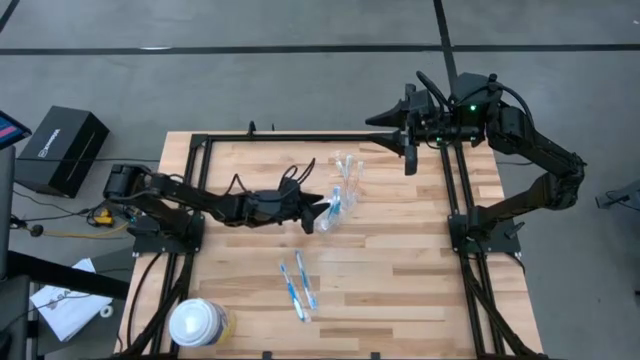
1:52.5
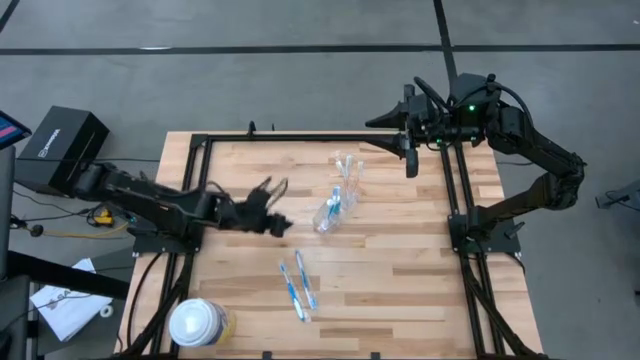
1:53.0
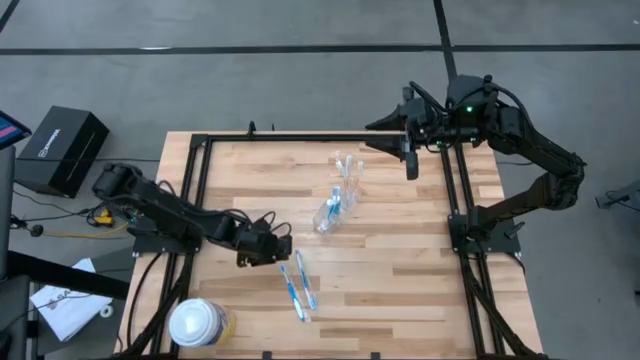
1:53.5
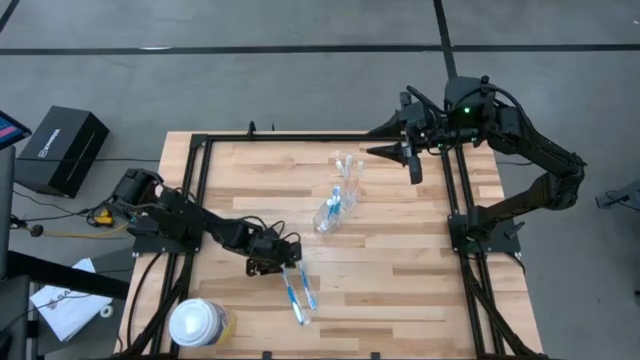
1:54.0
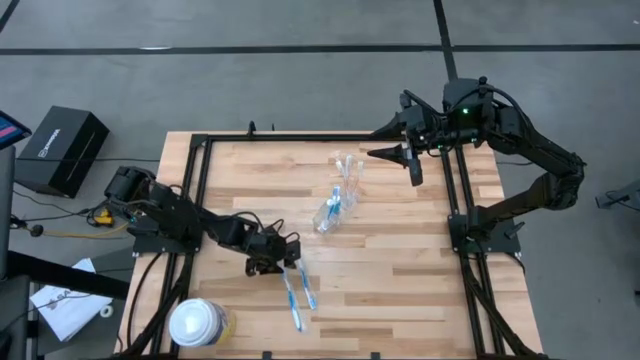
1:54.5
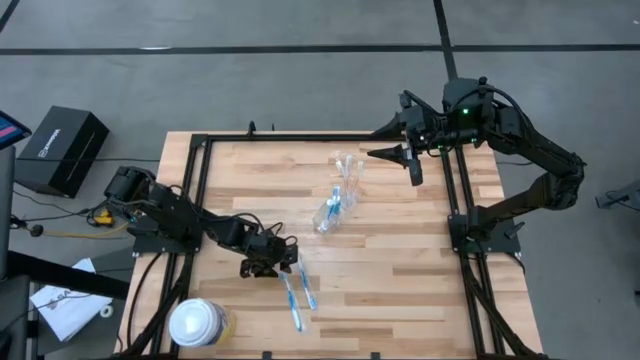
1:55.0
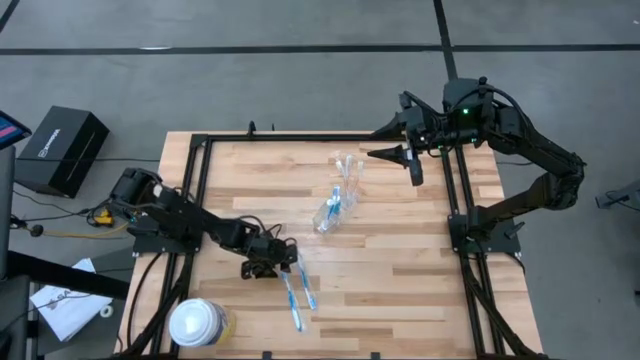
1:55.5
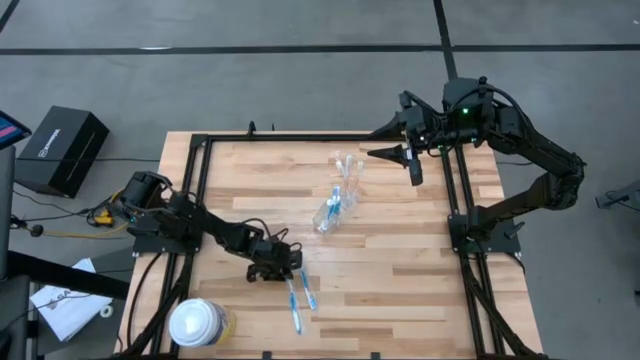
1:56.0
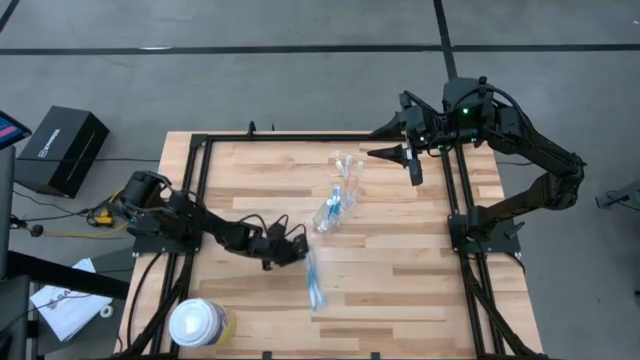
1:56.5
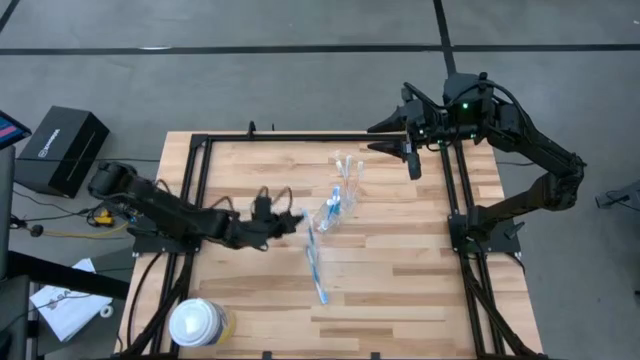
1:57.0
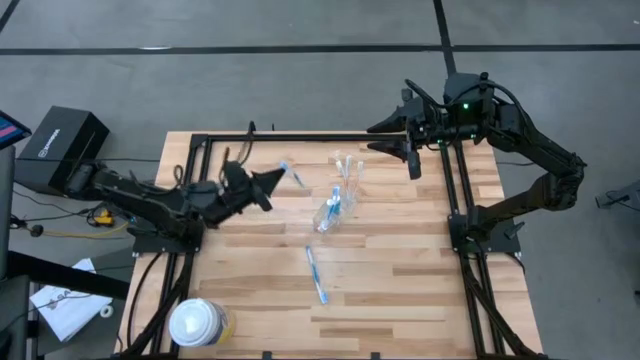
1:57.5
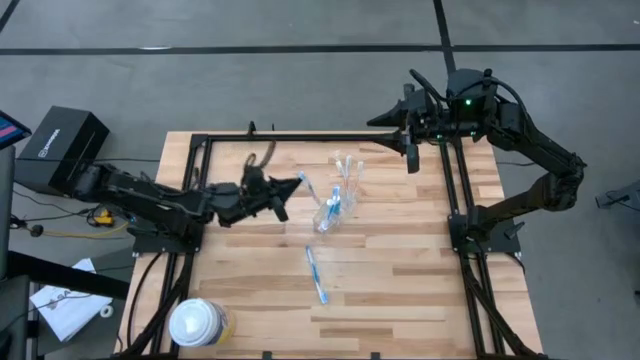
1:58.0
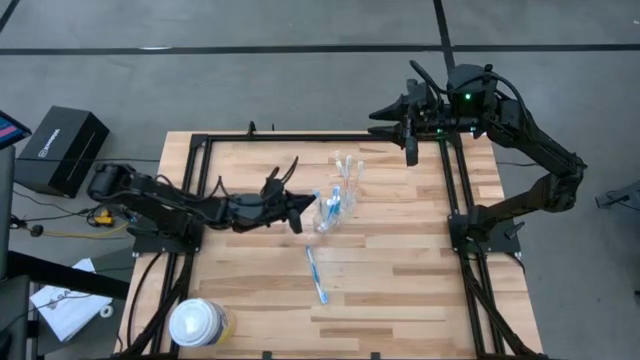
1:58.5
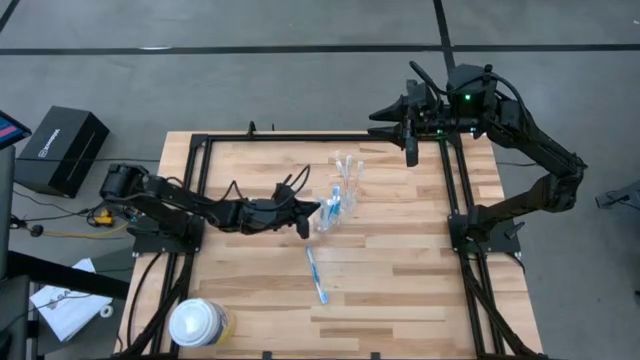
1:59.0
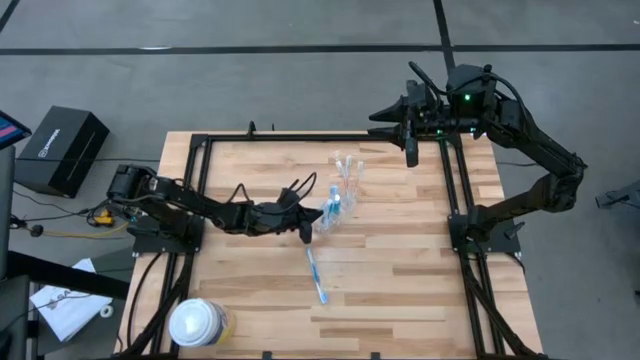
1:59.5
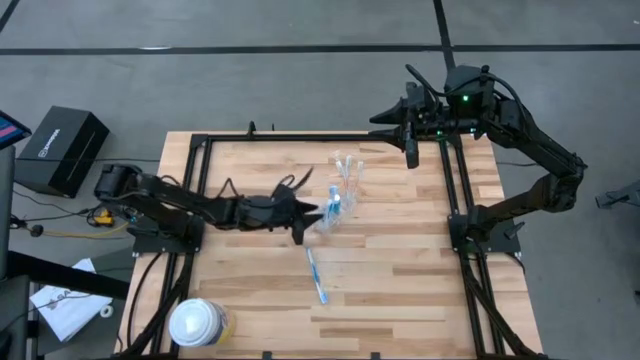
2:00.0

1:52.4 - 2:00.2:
Task: Pick & Place toothbrushing station
Put the left blue toothbrush into the left section of the transparent organizer

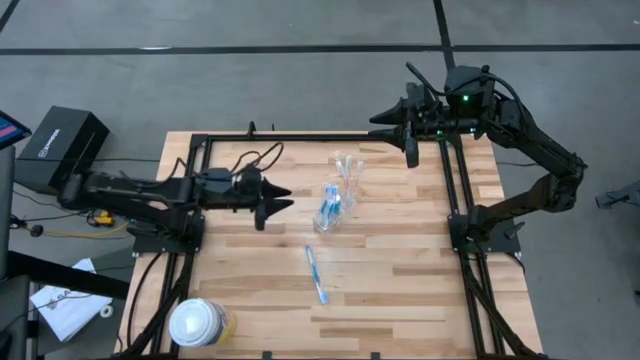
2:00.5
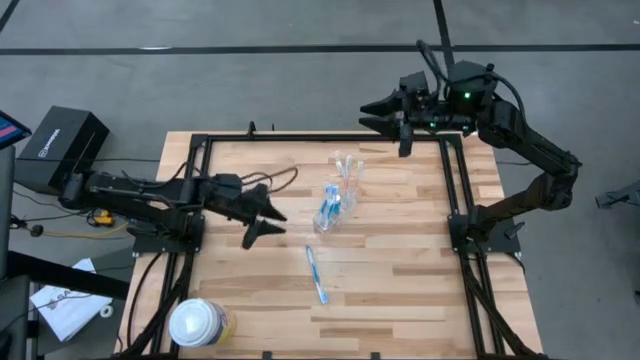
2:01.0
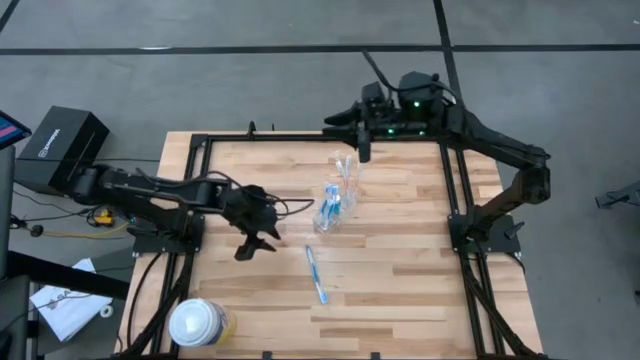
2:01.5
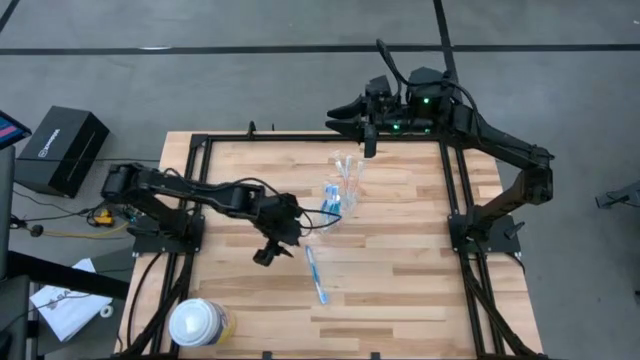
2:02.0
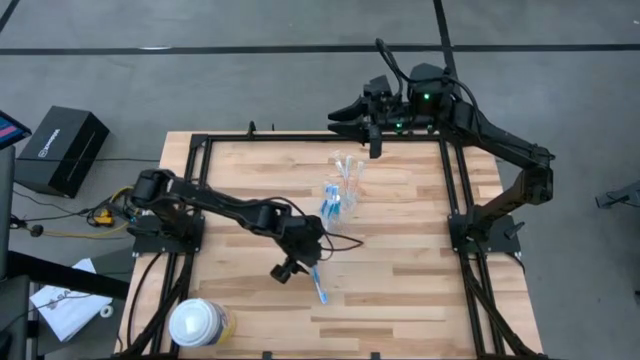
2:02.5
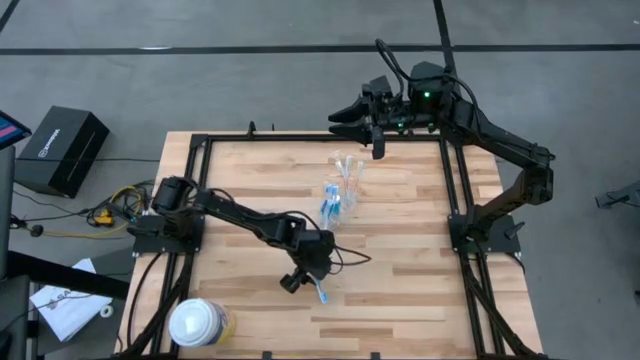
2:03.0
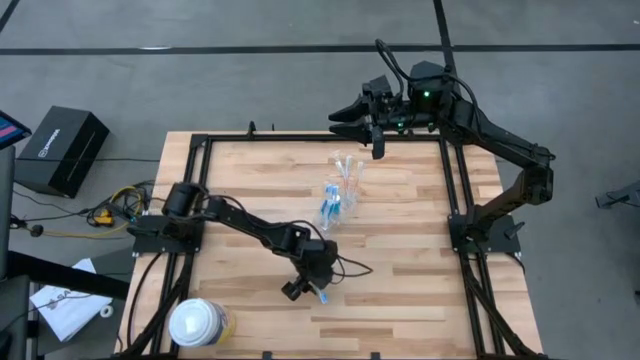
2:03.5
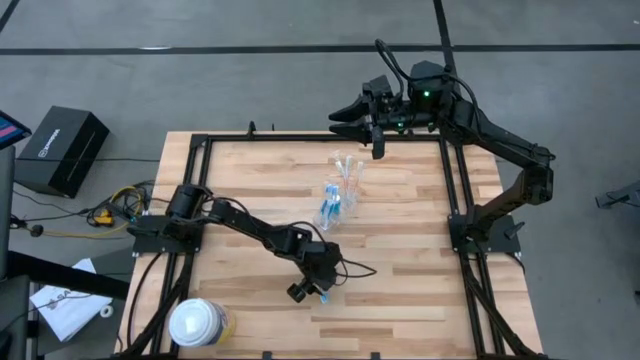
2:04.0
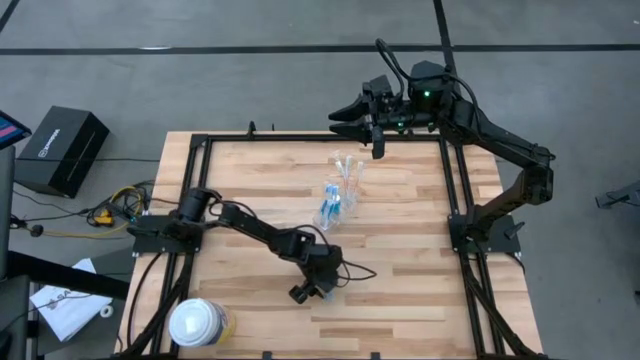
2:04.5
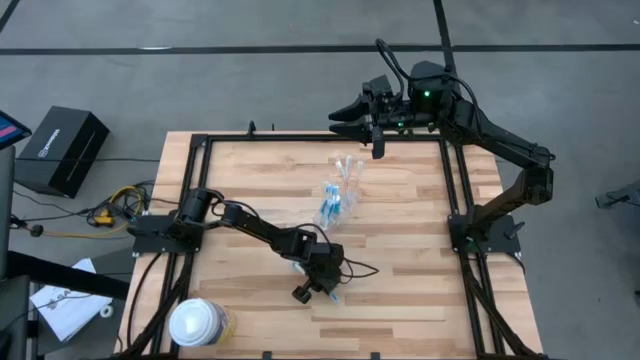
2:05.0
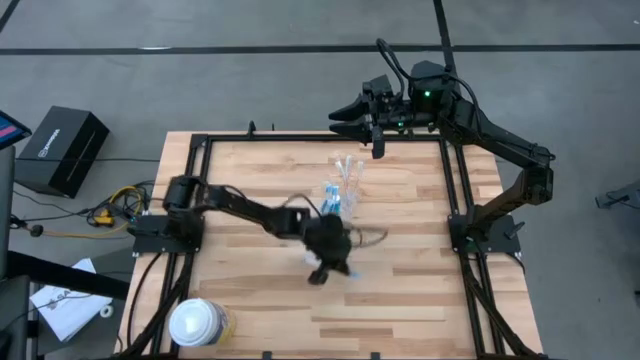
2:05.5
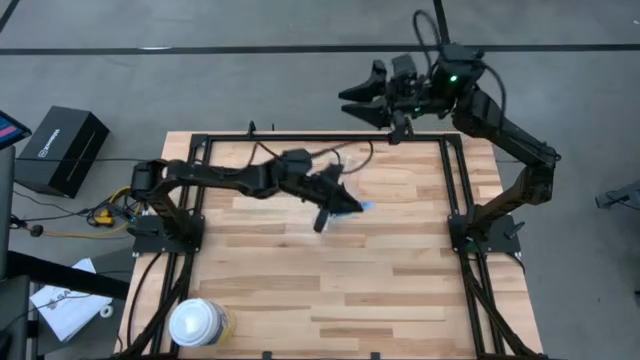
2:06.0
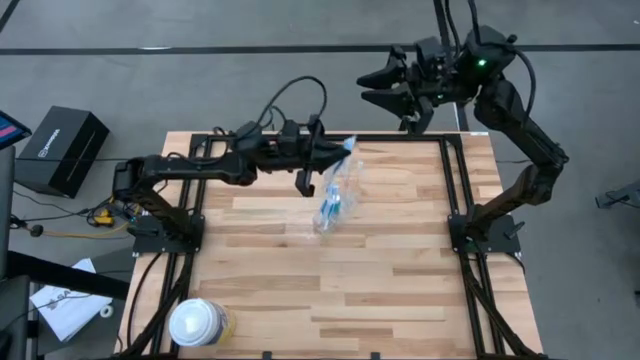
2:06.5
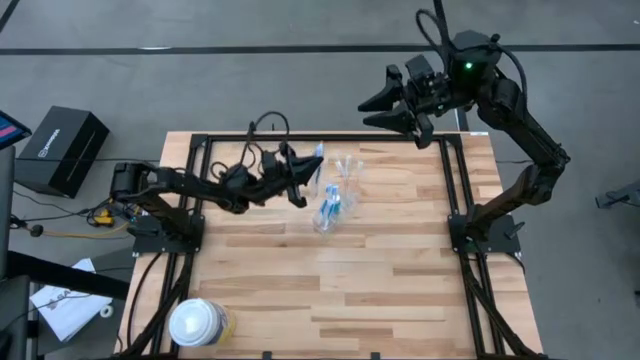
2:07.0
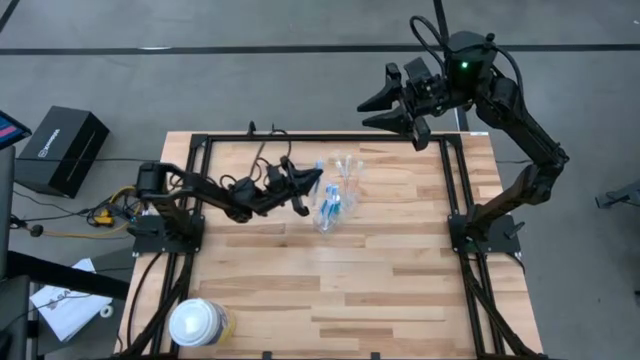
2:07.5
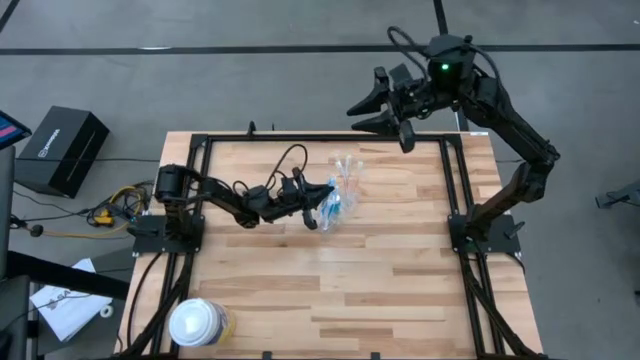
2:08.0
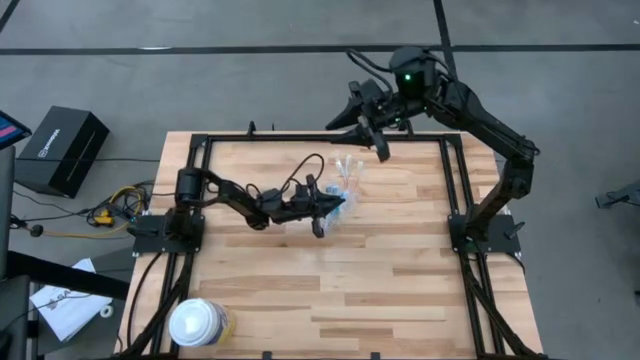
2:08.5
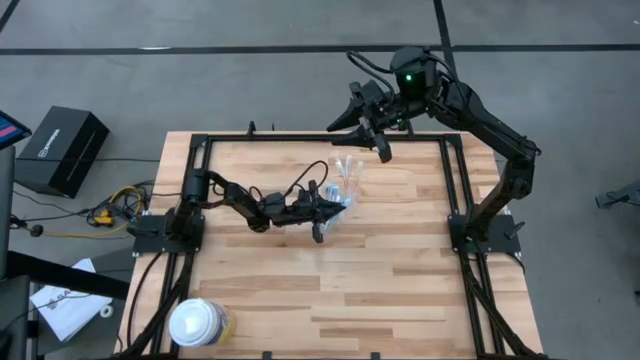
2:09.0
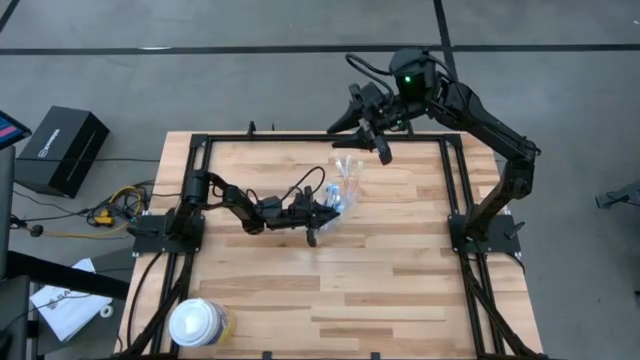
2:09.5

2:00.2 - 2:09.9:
Put the blue toothbrush into the left section of the transparent organizer

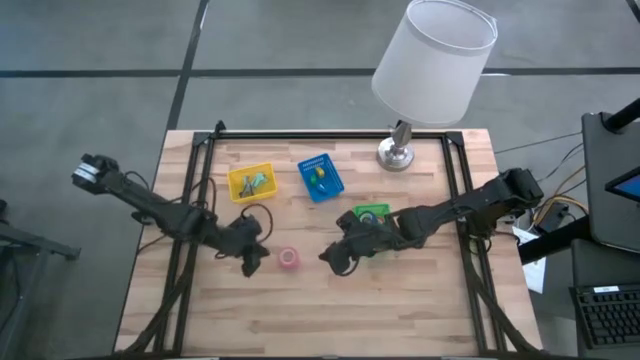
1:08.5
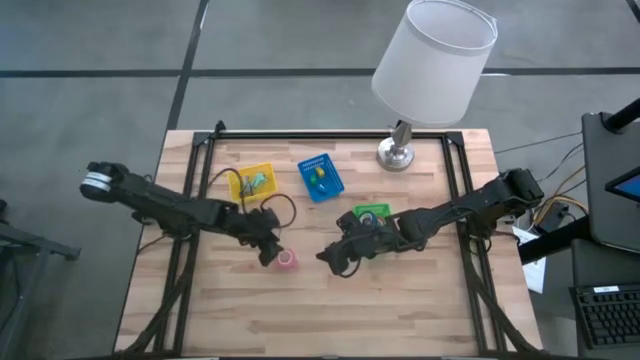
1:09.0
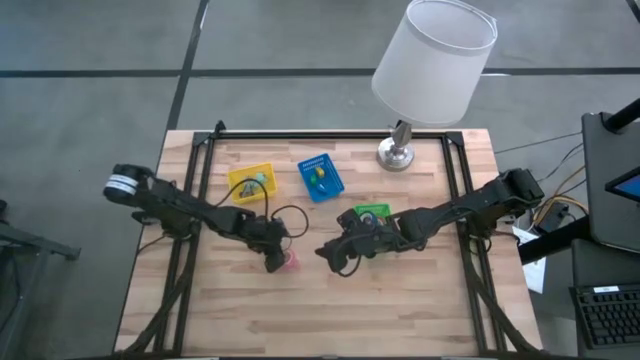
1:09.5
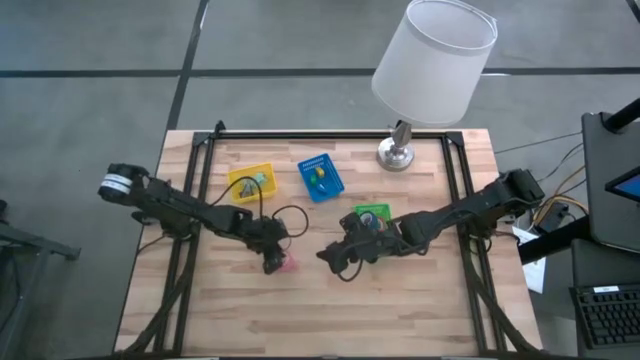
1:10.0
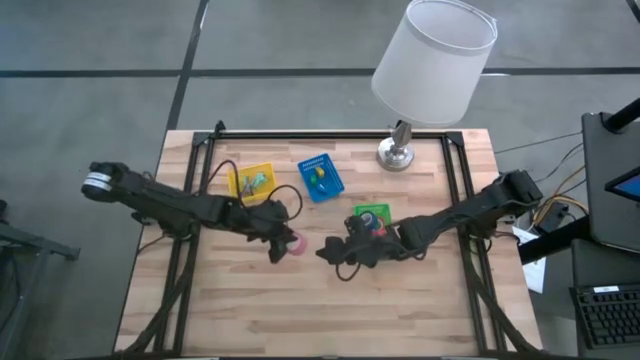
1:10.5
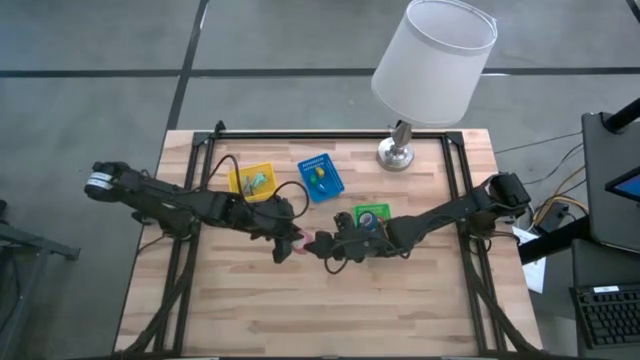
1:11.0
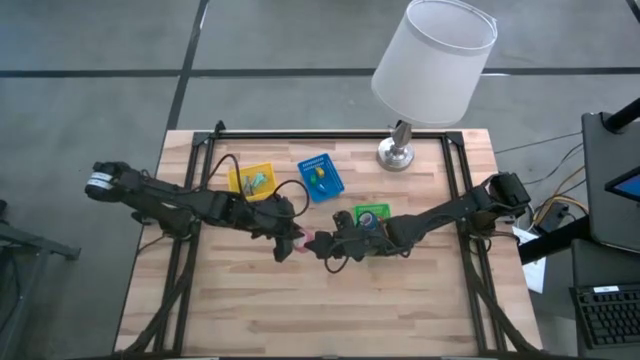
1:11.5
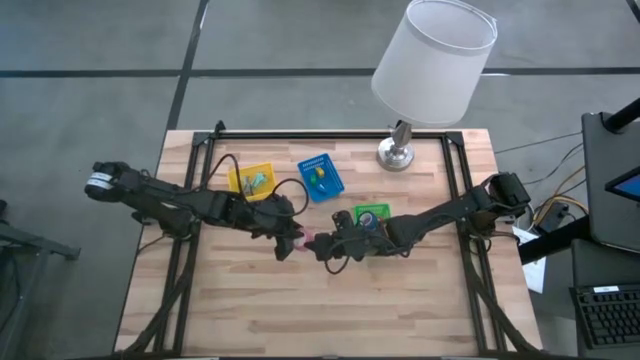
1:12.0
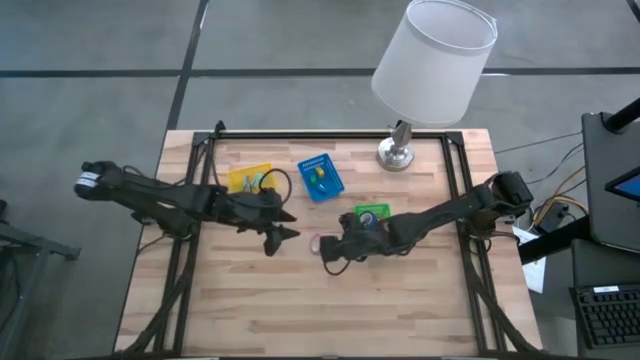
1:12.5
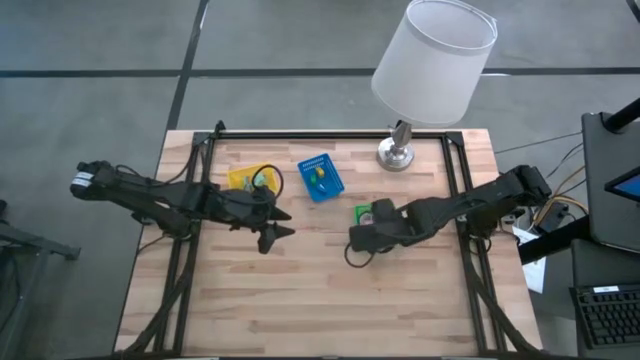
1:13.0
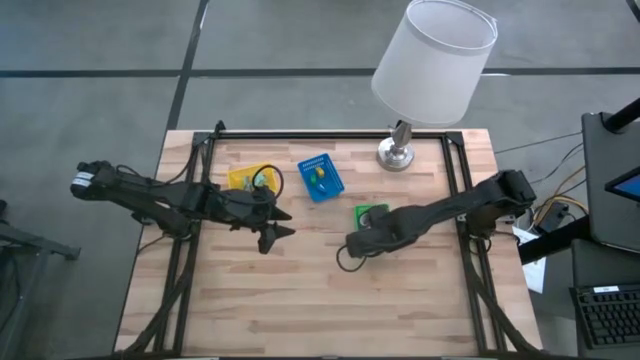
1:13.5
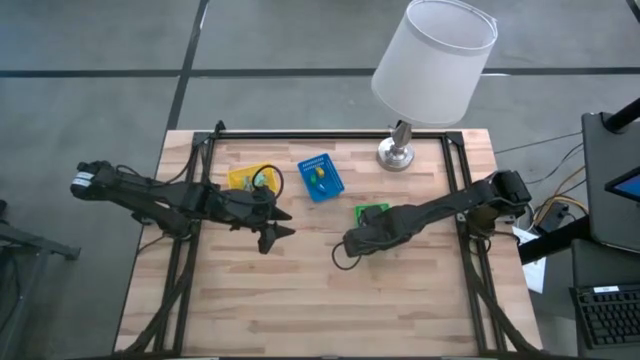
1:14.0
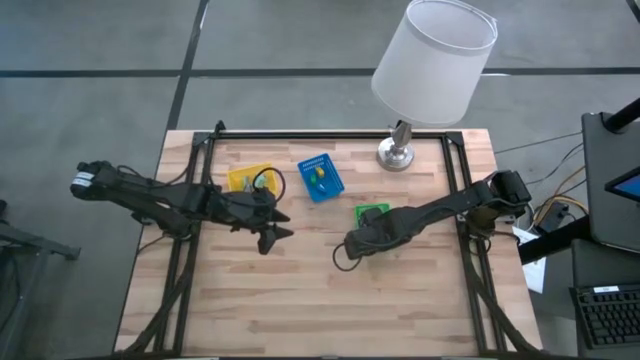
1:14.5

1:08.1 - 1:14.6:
Task: Pick and place Stapler, Stapler remover, tape
Put the pink tape into the green bin
